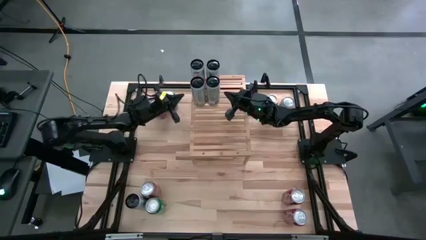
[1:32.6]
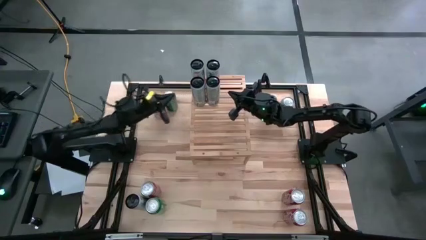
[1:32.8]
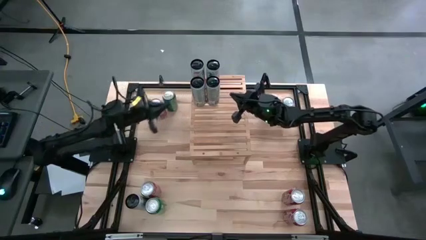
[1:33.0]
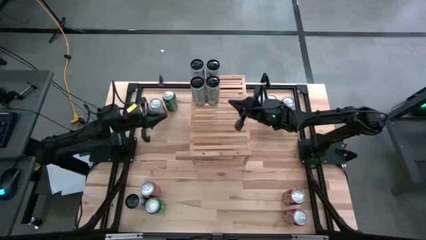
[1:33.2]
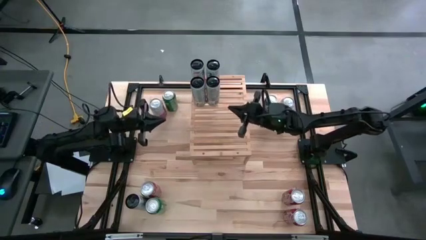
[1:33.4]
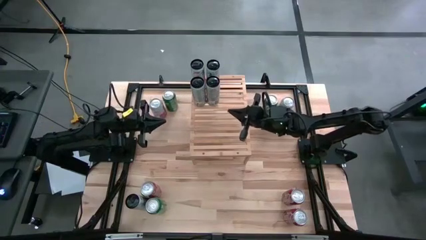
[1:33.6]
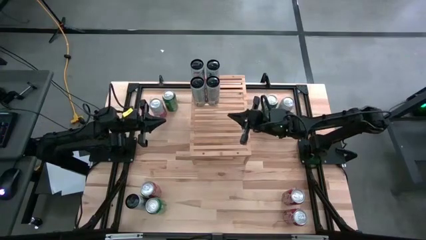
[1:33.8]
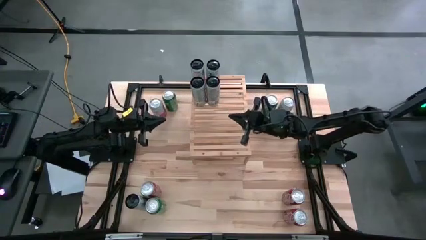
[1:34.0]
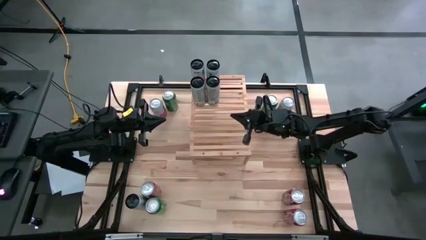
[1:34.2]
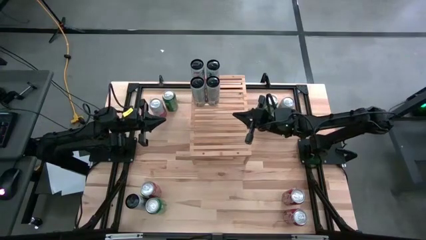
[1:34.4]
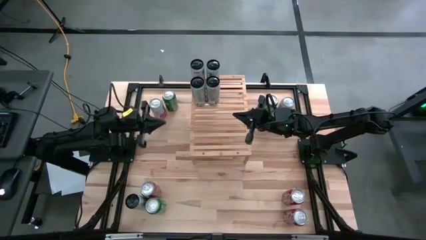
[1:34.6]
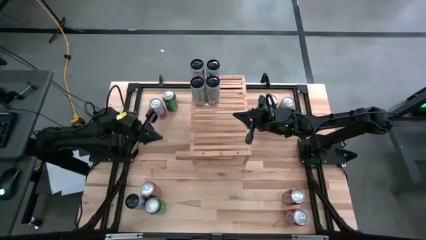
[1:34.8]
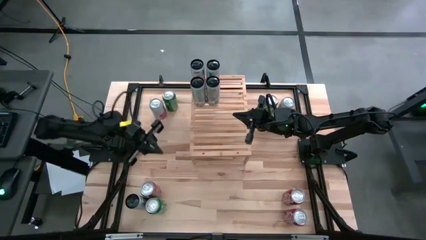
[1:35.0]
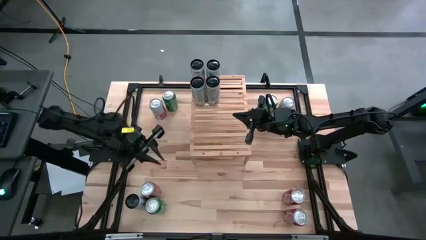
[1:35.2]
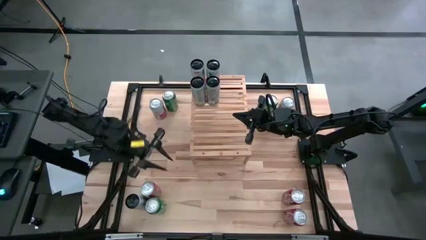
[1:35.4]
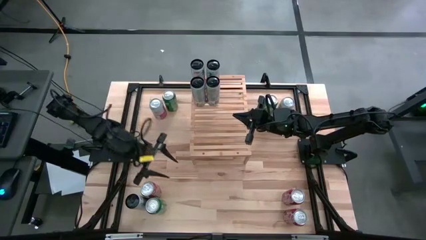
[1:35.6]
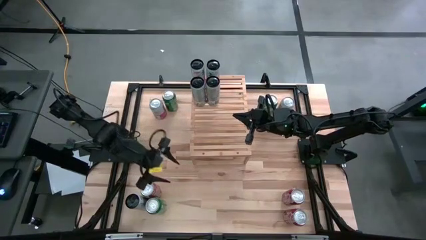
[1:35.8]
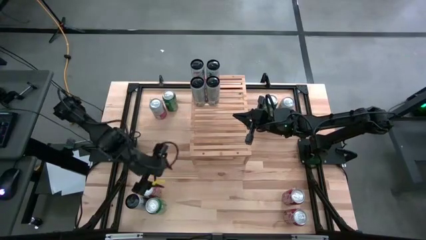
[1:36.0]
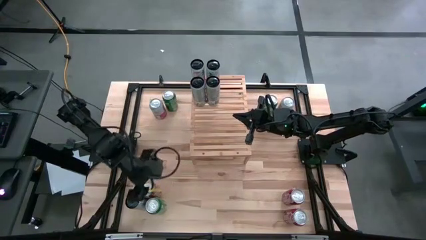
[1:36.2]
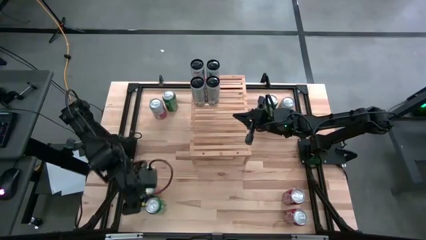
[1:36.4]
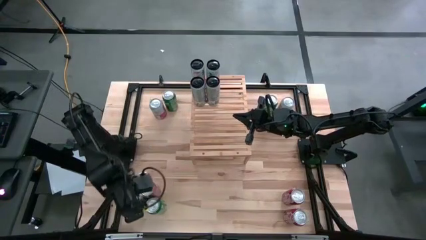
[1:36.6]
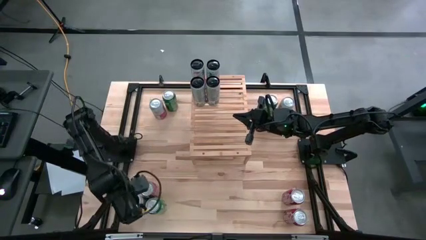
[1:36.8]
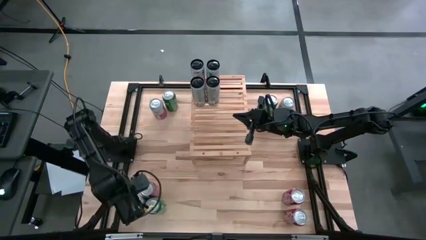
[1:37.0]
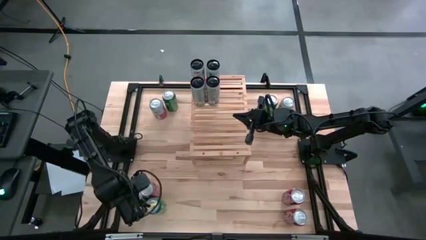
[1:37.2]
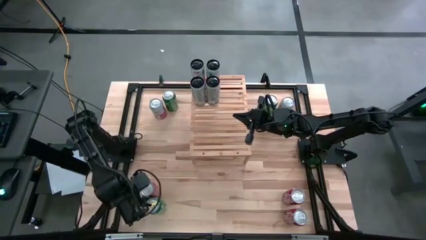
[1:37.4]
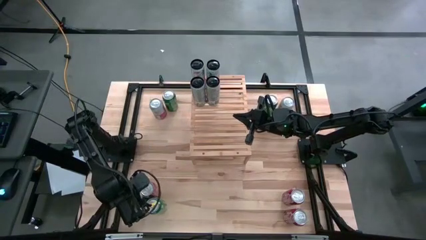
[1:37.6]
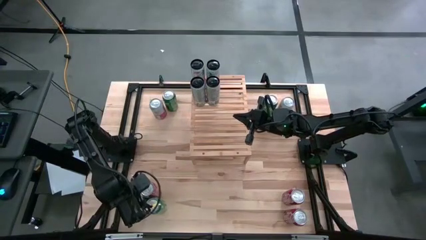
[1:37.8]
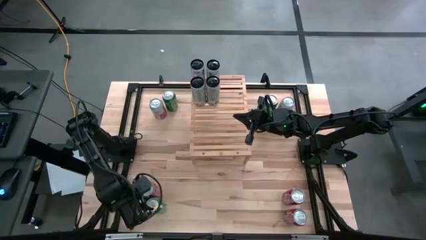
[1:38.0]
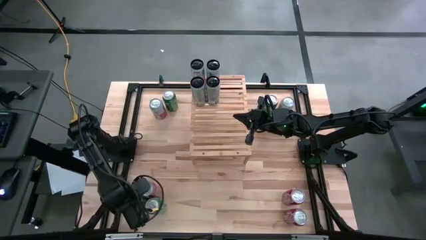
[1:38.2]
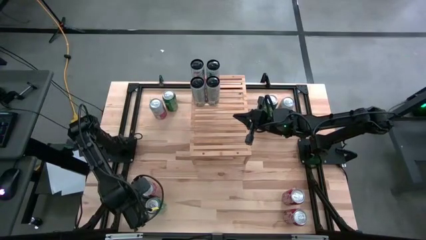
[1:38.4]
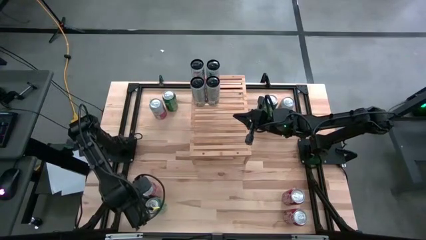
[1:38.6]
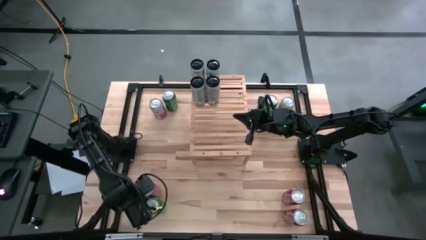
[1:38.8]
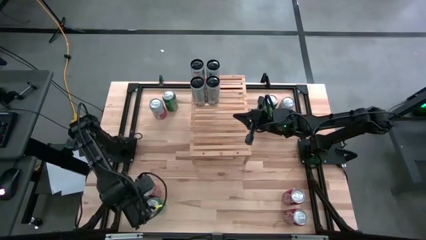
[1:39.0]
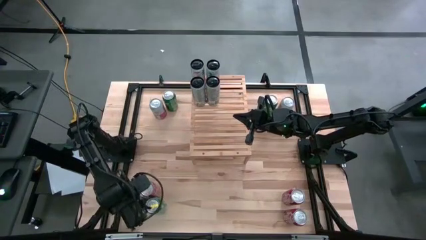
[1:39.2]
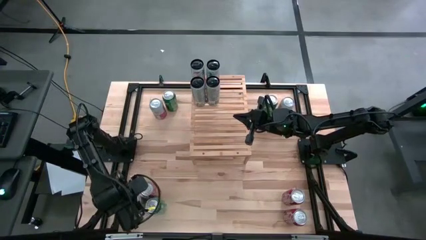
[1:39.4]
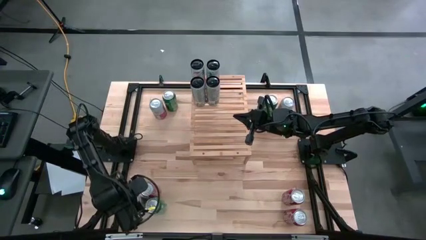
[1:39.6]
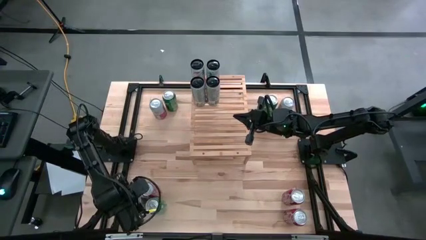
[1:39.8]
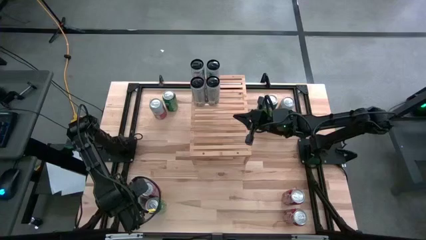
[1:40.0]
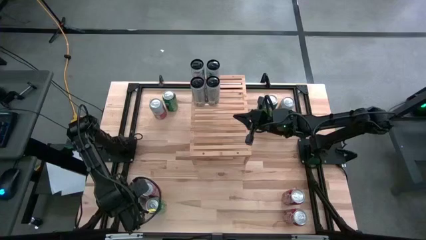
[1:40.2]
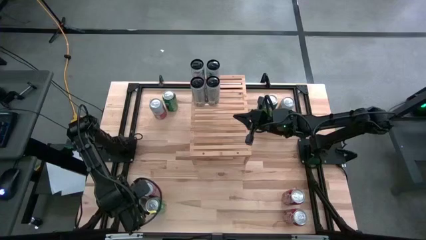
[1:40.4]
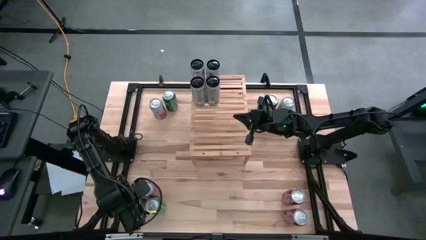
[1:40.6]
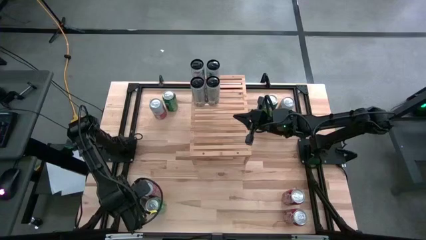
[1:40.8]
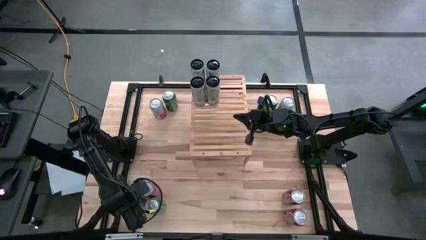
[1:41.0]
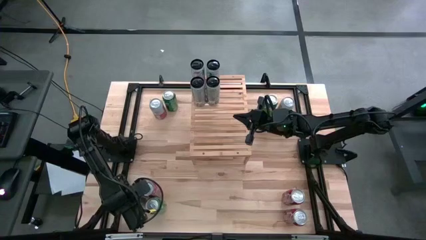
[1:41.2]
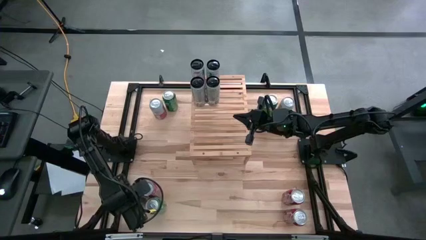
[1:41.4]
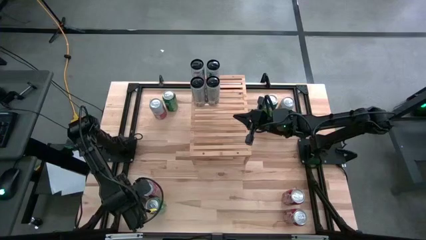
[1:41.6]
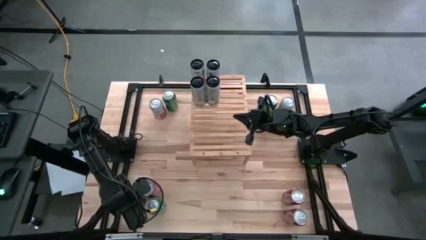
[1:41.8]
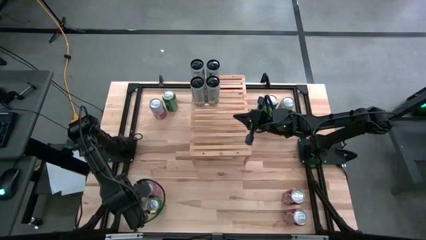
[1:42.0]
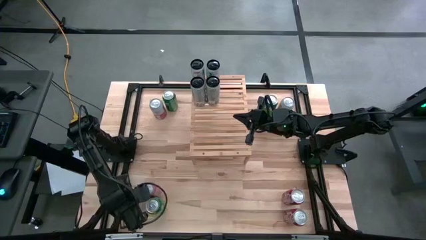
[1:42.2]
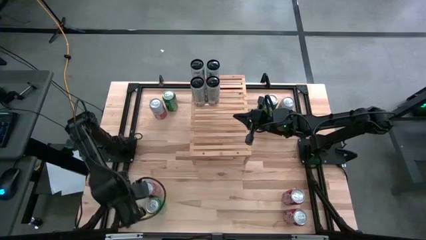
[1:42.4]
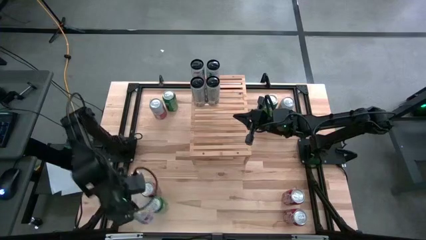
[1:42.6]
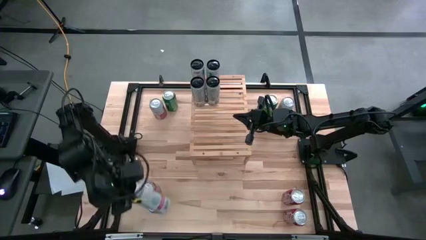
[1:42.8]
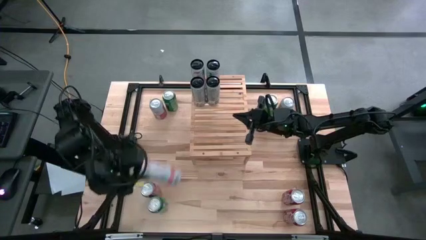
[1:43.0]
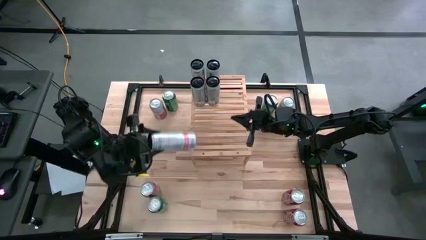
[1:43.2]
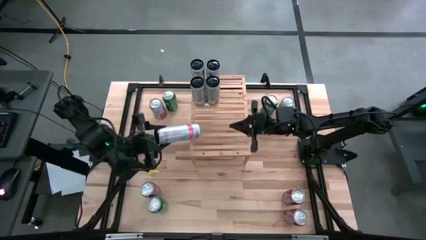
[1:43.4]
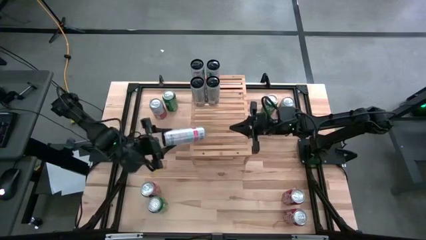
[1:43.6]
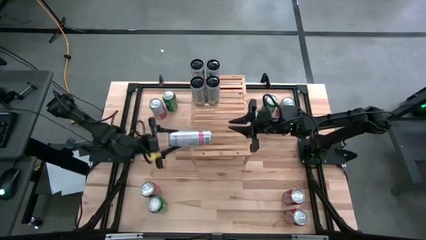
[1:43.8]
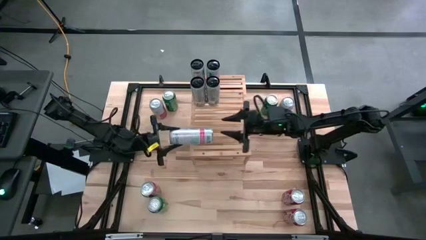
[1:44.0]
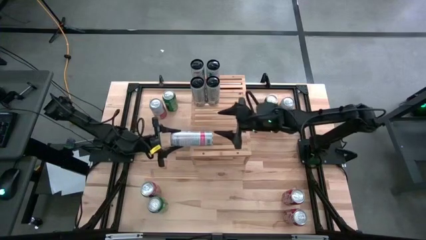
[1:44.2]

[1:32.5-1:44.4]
Task: Place canned beverage on shelf
Put the white pink soda can aligned with the other white pink soda cans on the shelf

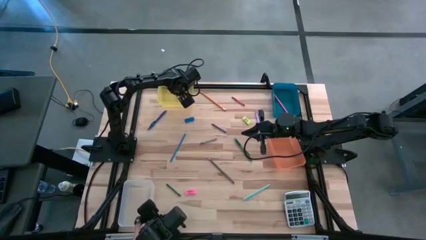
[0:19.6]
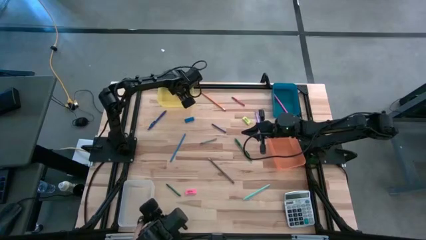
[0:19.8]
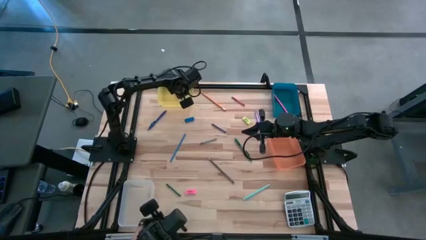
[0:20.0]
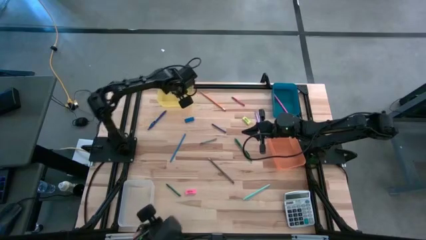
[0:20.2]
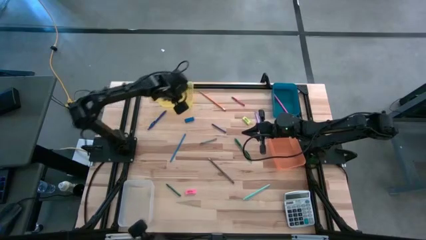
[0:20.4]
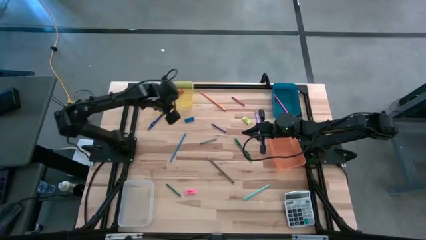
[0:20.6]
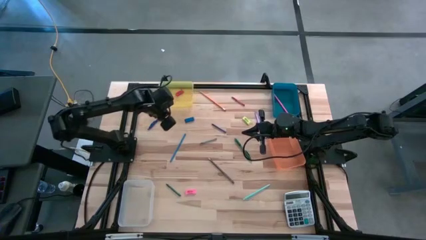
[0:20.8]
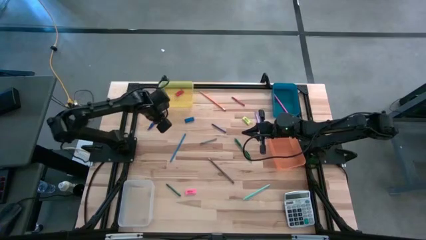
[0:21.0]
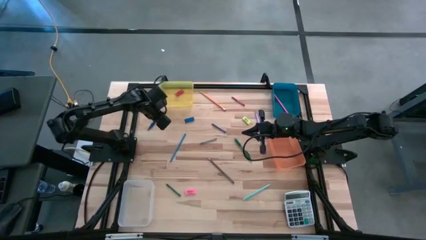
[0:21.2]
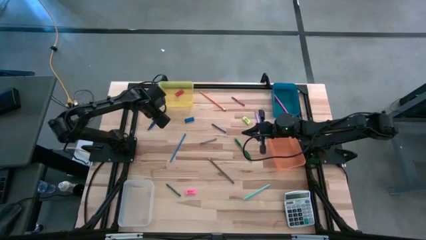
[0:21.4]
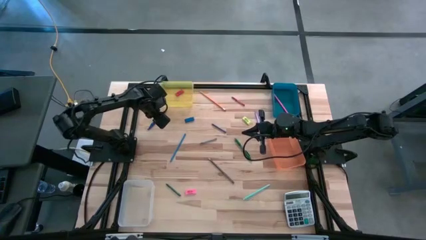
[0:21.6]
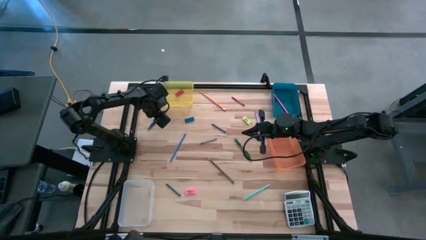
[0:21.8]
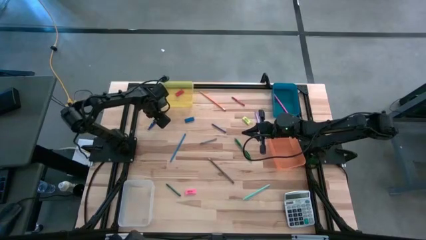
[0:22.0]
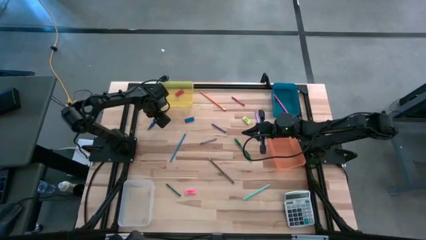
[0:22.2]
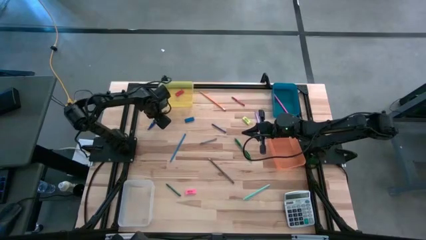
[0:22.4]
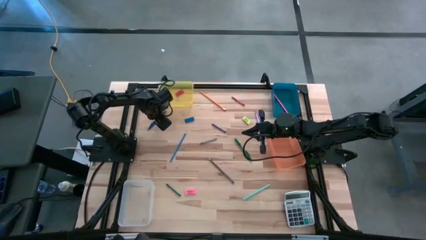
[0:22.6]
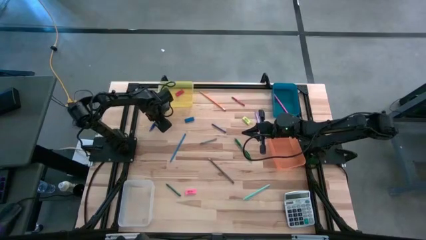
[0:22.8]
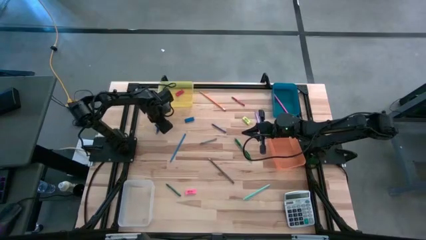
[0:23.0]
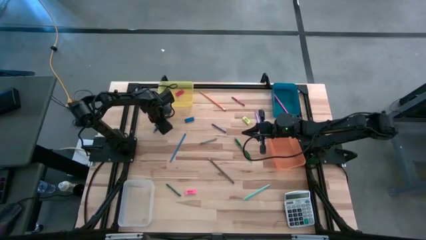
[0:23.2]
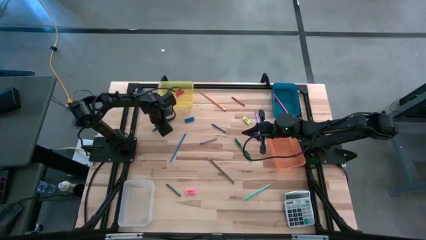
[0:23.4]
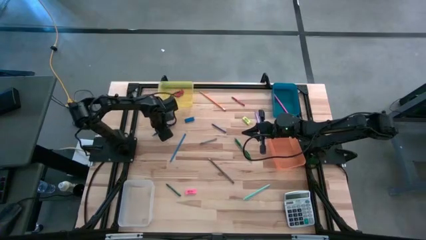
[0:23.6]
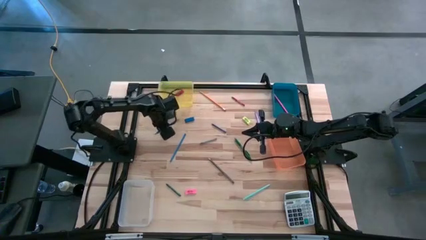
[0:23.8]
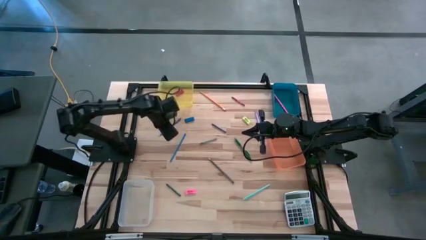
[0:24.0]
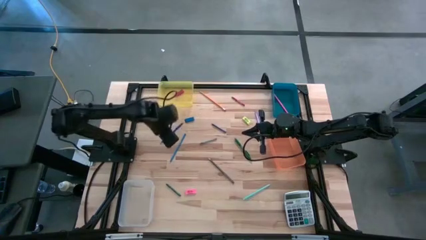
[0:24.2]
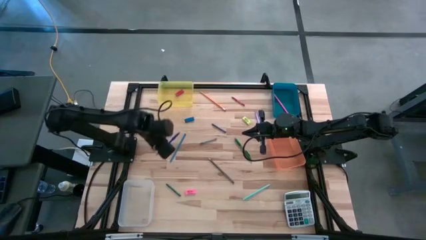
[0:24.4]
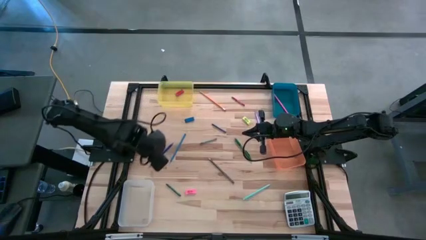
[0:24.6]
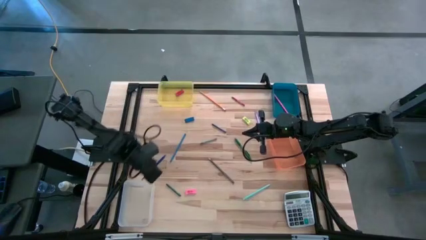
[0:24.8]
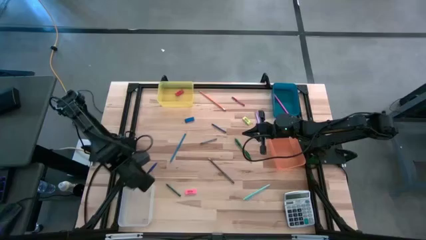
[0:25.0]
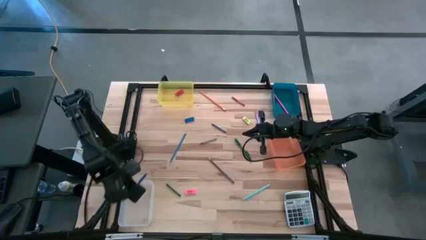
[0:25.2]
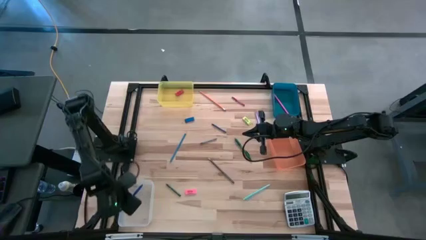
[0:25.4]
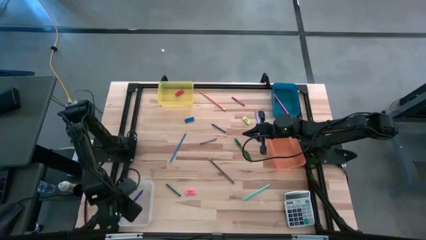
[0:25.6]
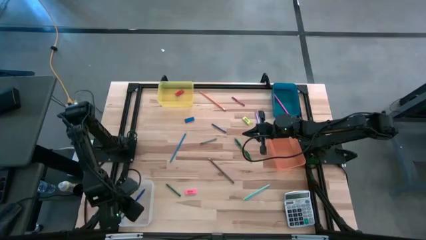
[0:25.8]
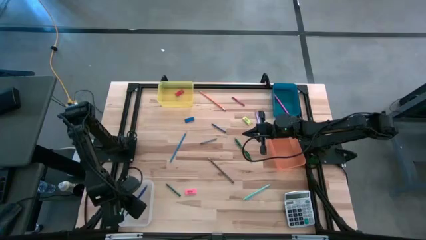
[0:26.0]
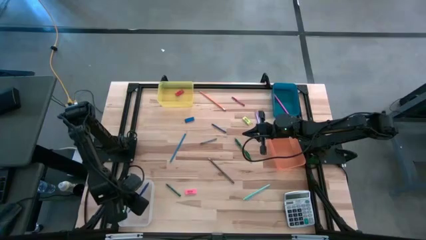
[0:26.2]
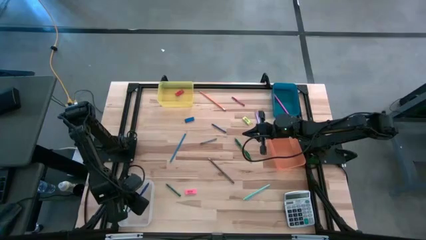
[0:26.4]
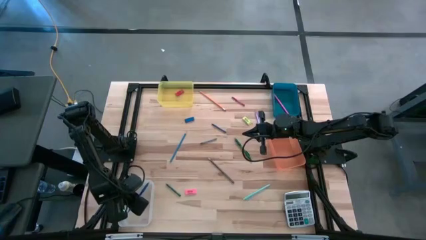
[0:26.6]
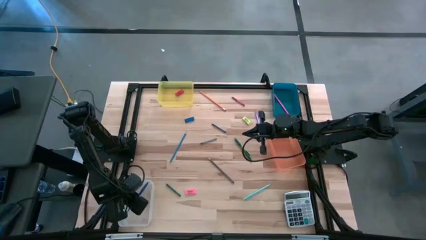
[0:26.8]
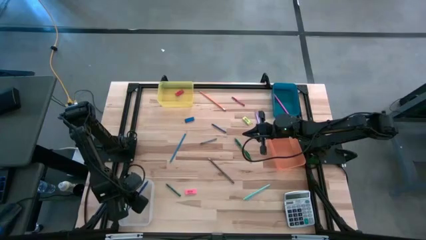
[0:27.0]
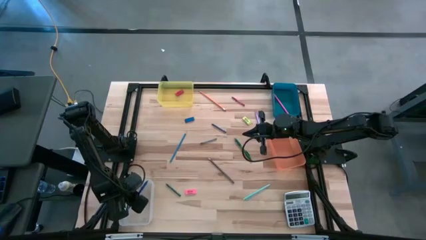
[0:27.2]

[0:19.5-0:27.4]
Task: Sort crayons/erasers/pens/pencils in bins
Put the blue pen into the white bin
